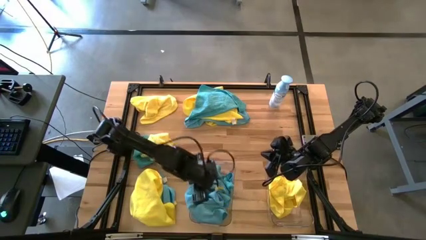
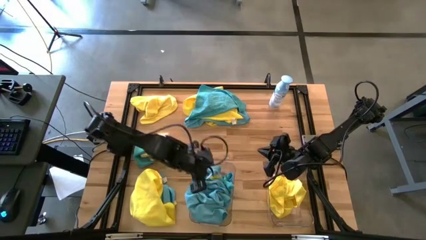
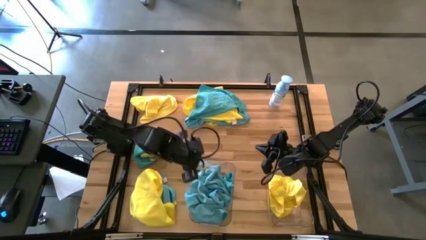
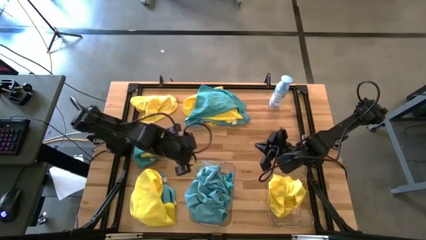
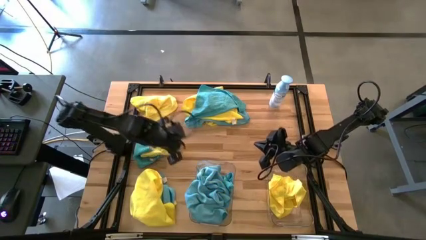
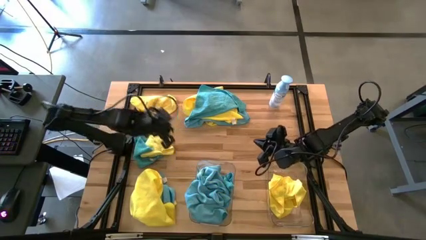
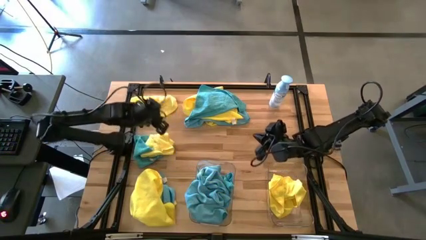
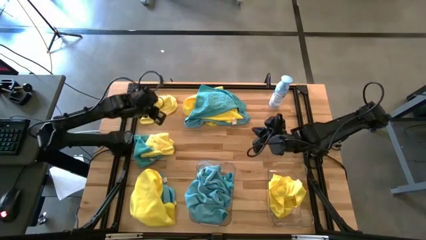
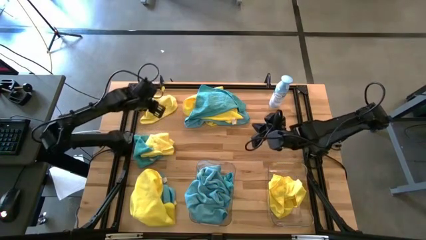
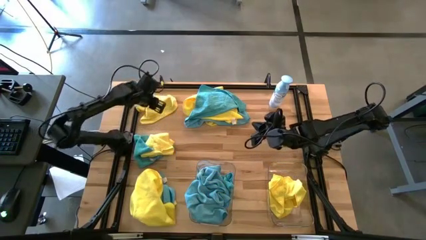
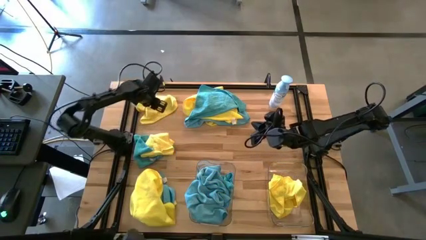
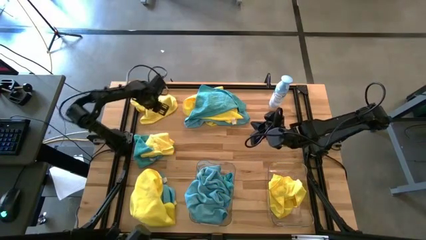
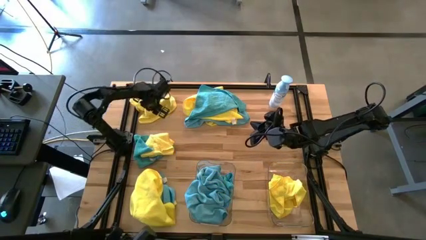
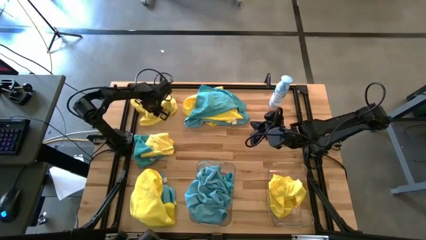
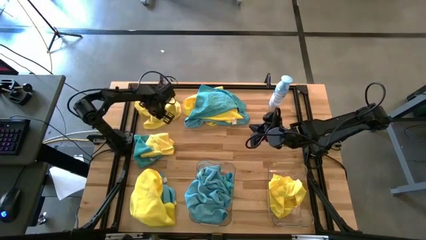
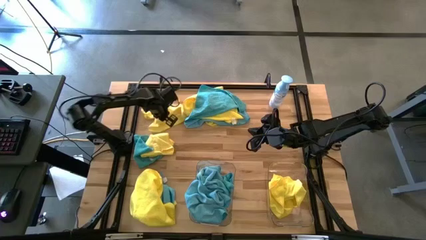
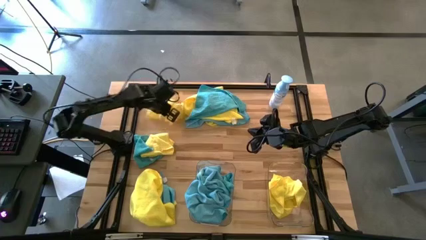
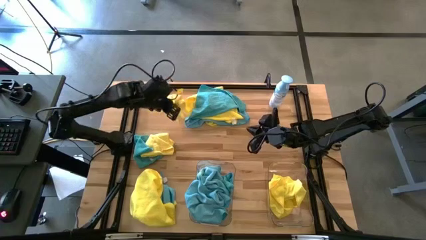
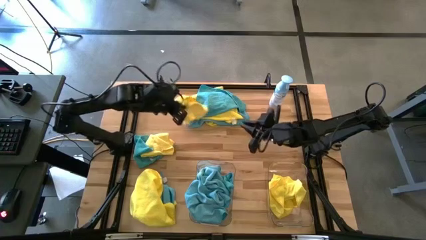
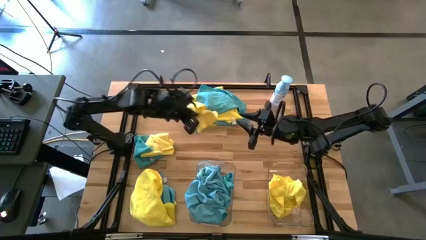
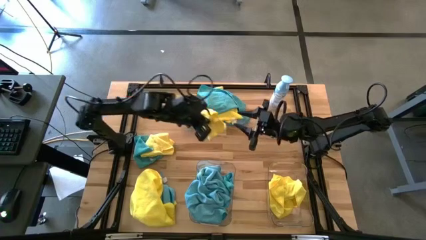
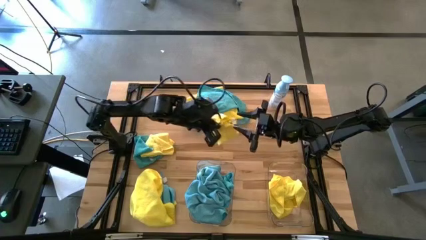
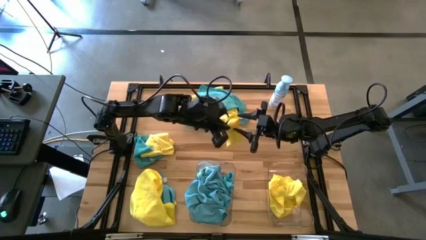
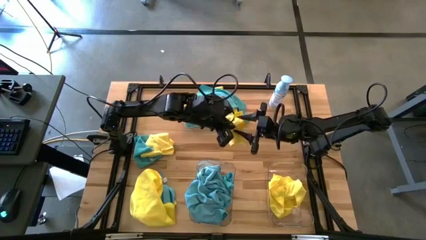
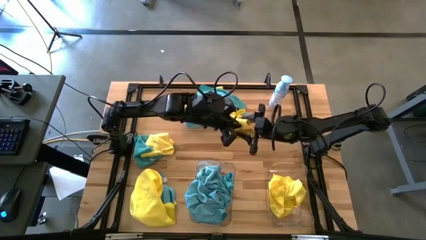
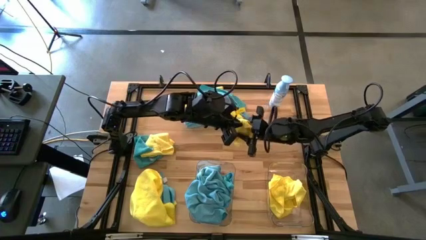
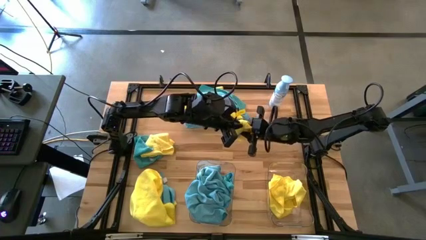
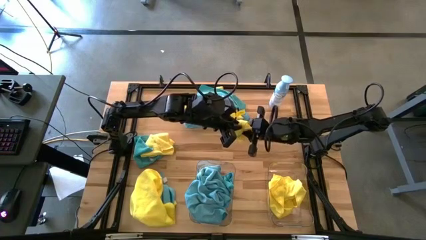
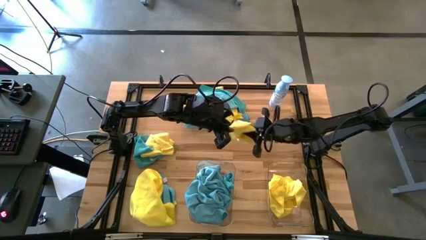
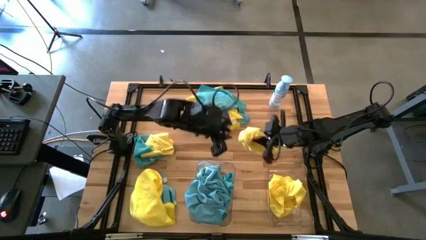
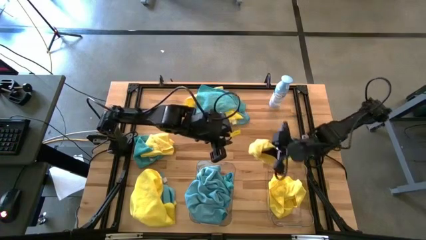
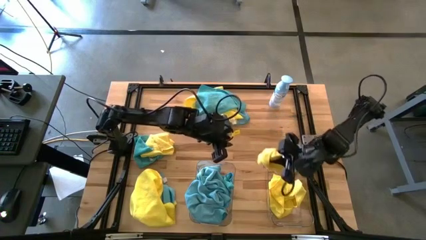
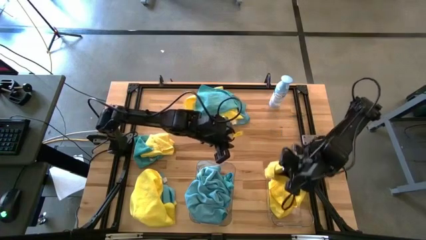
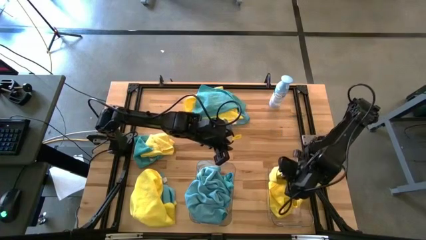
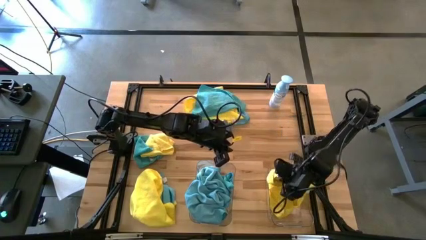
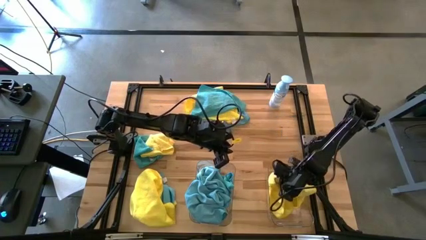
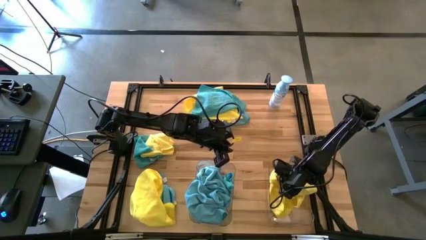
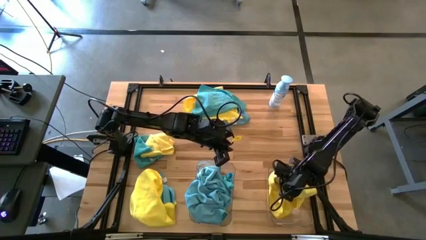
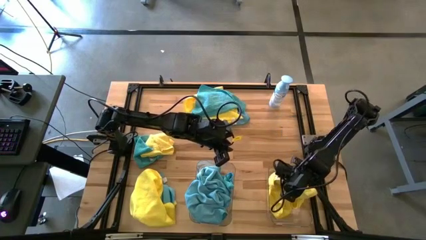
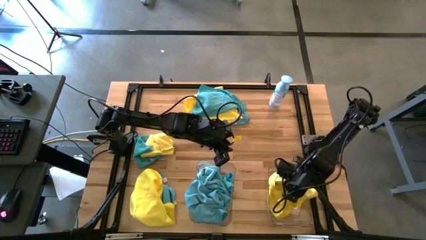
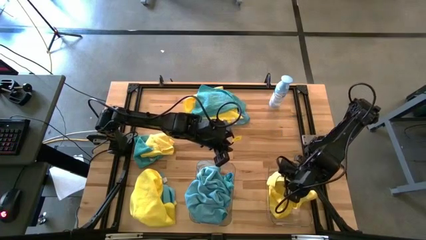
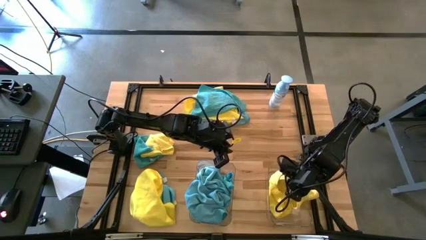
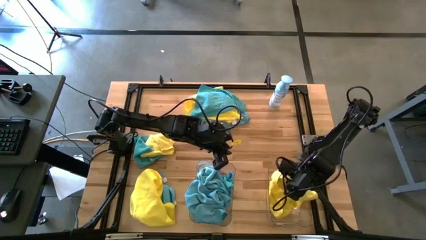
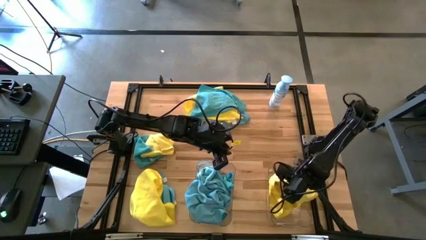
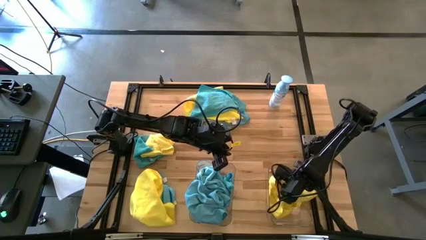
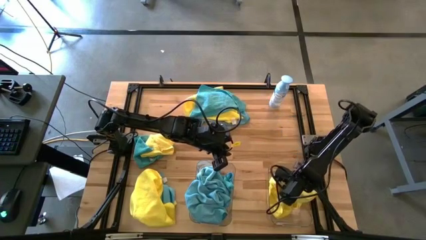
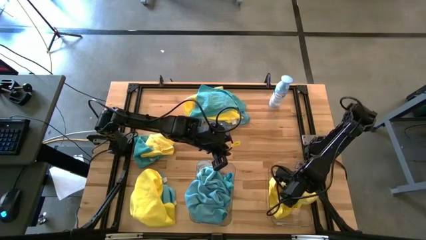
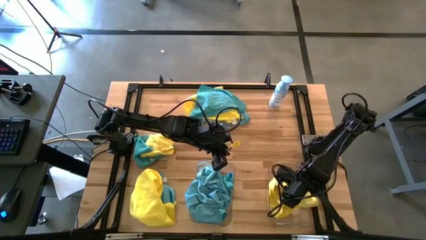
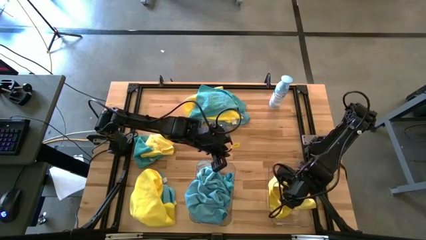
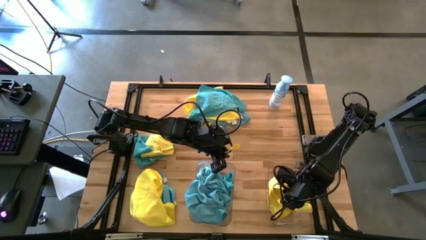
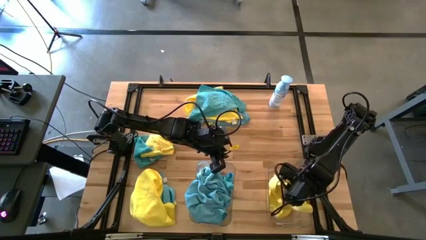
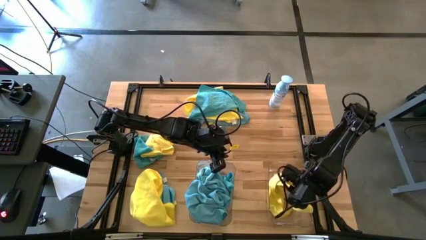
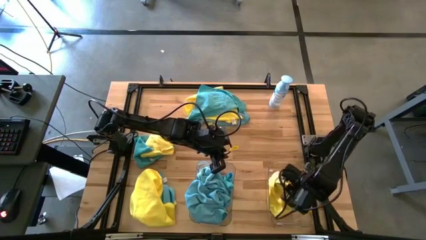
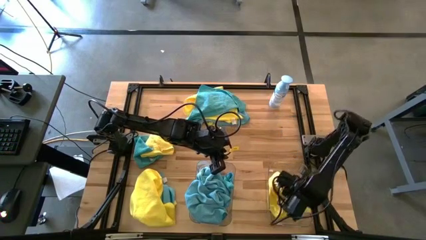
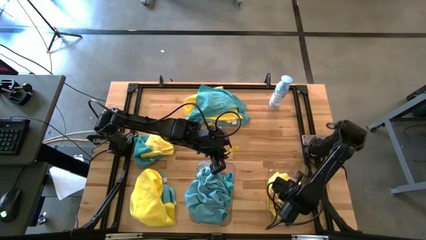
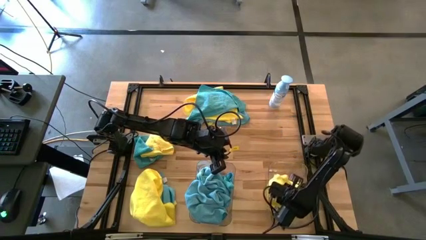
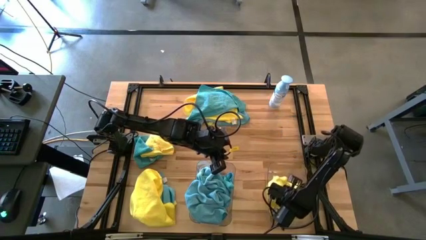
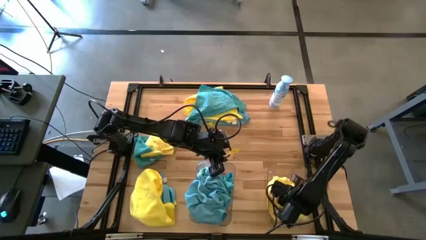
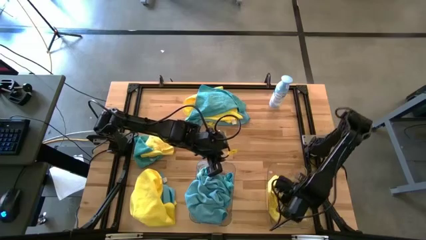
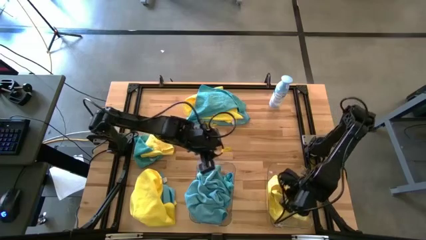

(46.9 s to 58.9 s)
Task: Sort microfiber towel by color & place in baskets
Put the yellow towel into the right transparent bin
